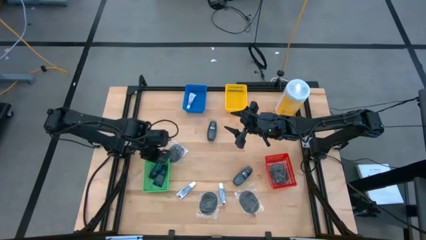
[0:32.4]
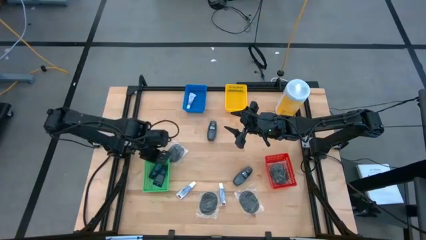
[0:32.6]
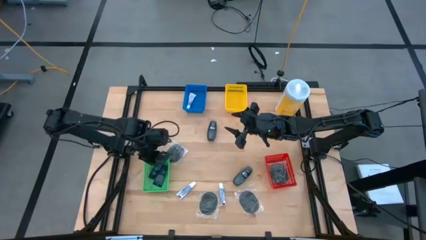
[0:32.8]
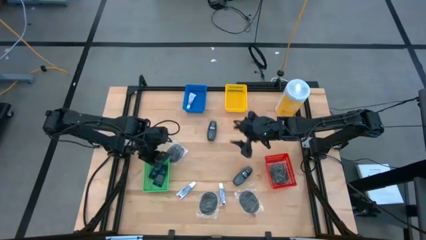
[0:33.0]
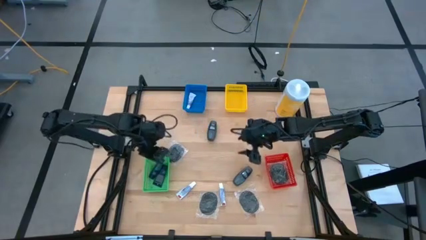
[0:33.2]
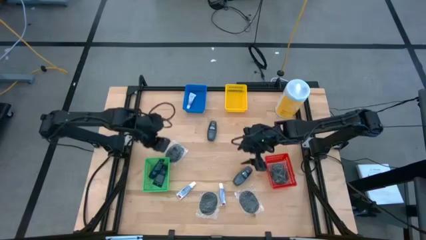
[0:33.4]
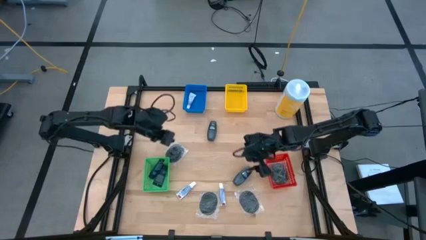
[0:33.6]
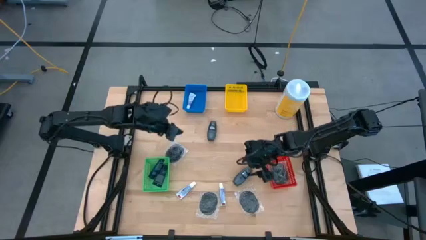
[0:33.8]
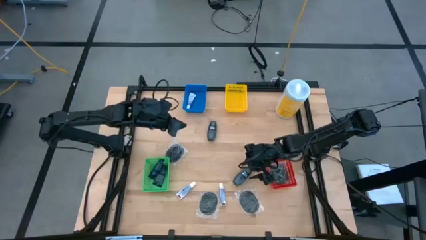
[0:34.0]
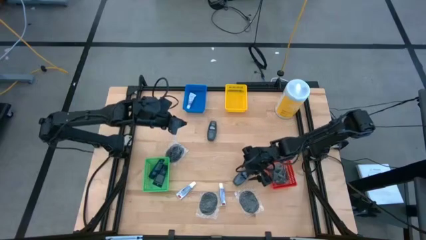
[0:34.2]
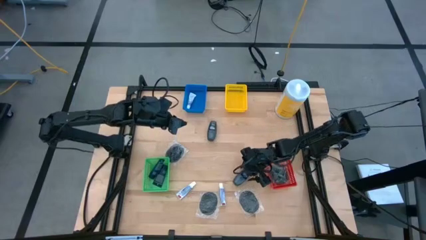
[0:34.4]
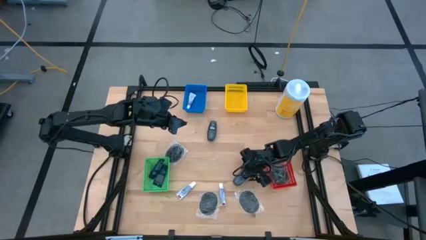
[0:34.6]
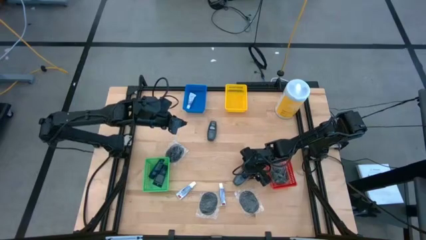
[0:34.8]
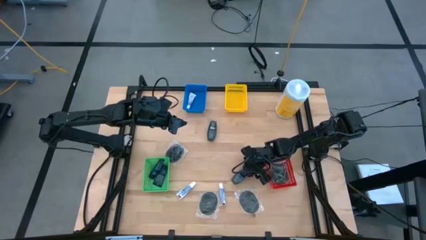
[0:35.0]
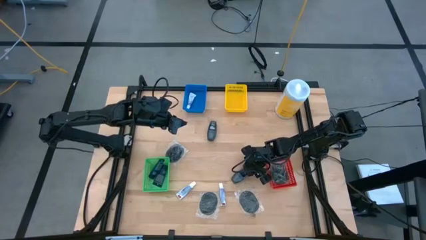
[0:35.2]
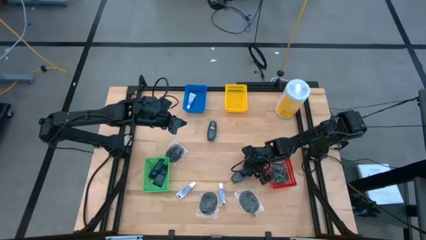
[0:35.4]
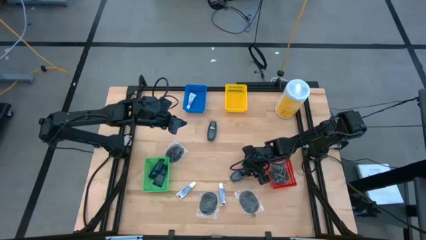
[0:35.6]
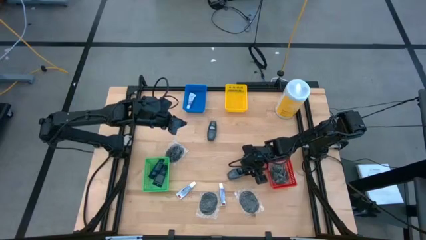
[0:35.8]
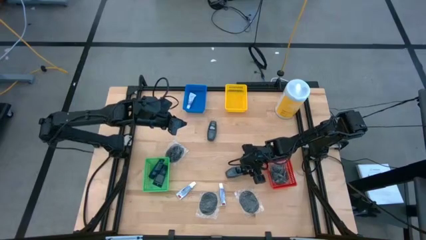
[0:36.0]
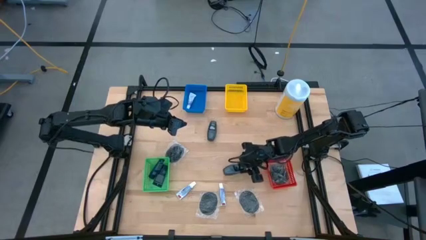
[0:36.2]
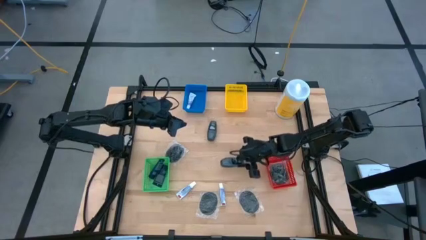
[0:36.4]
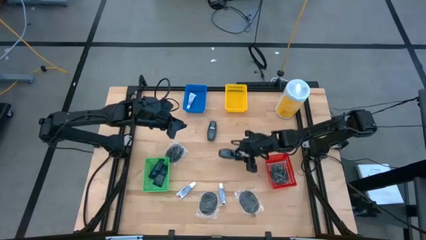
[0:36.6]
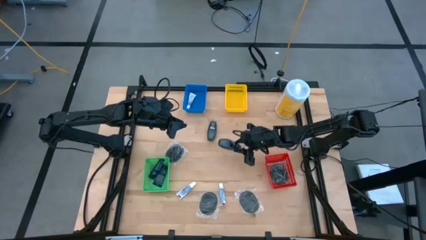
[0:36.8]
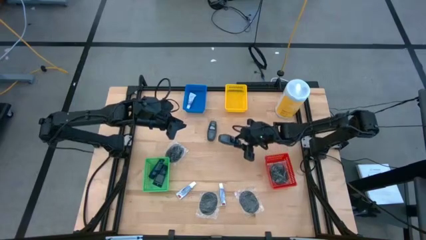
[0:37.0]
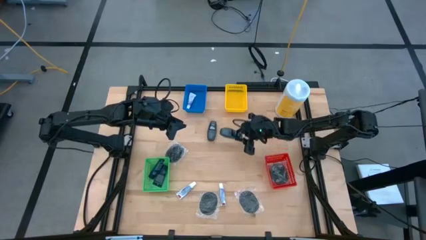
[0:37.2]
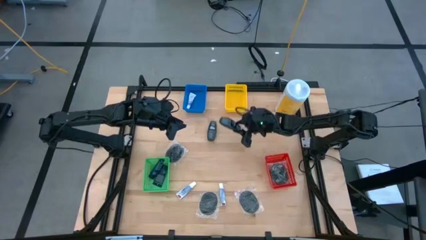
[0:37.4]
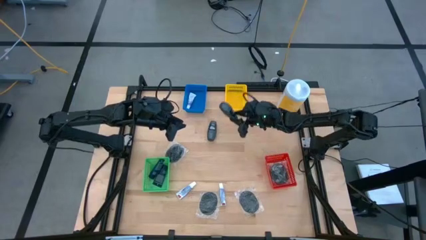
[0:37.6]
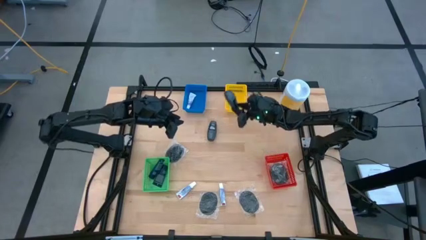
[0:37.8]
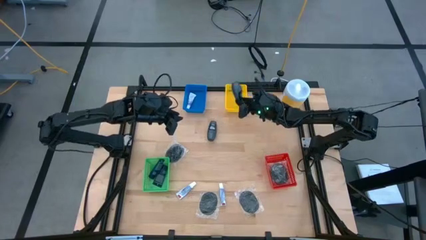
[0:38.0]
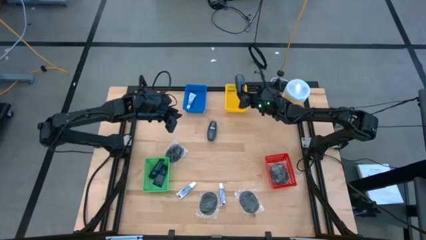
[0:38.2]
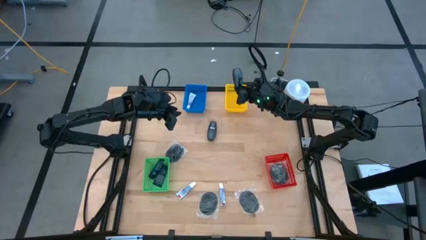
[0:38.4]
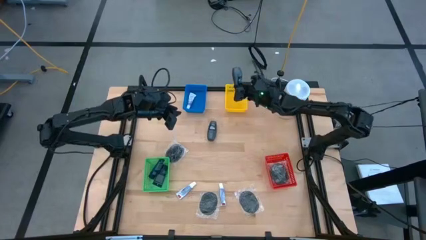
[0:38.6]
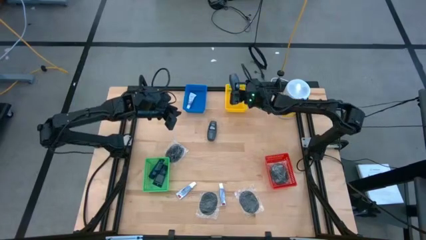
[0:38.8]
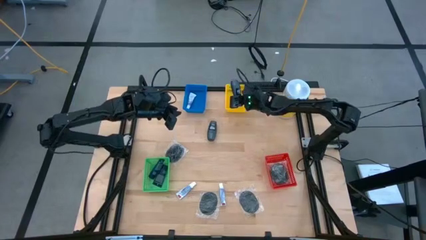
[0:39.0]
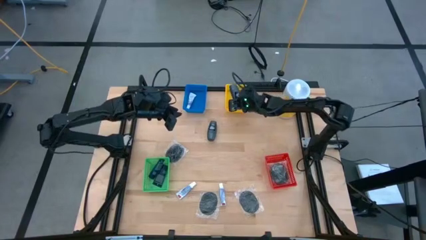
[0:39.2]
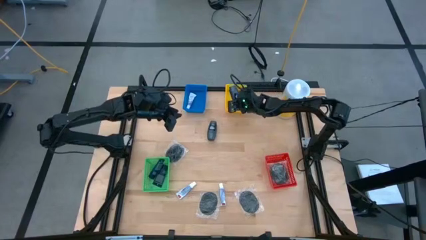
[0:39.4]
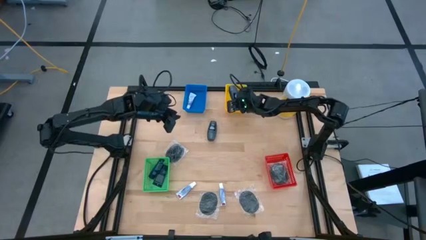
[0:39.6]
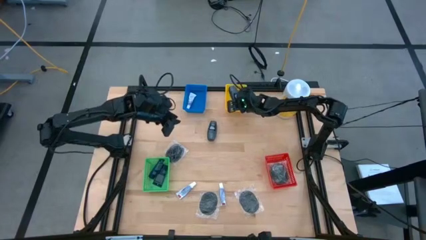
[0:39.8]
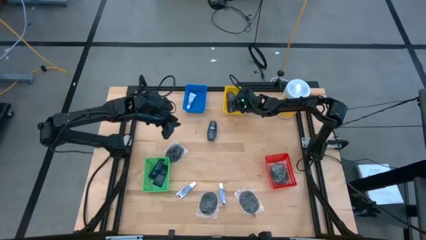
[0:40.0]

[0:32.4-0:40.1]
Task: Pick & Place Travel size toiletries
Put the gray deodorant into the yellow basket

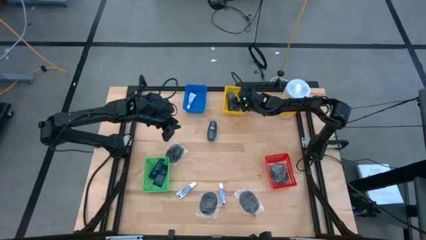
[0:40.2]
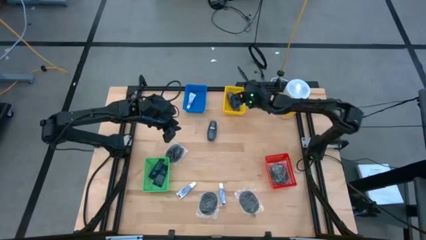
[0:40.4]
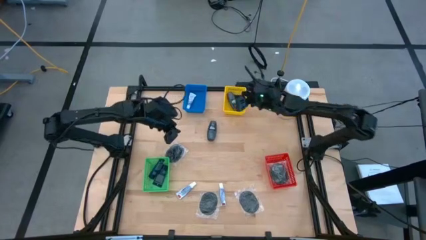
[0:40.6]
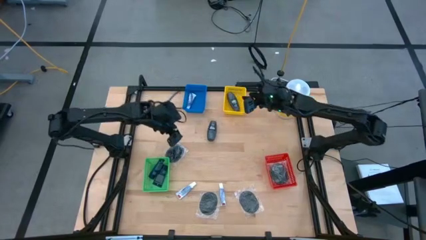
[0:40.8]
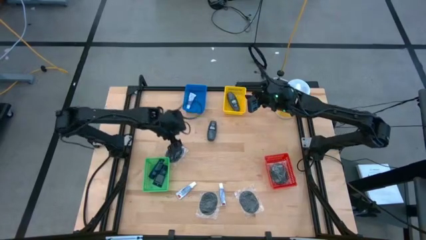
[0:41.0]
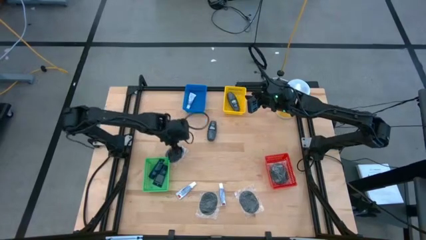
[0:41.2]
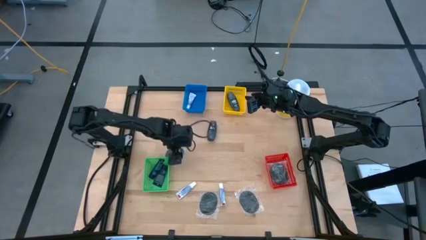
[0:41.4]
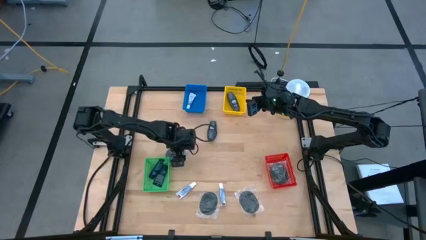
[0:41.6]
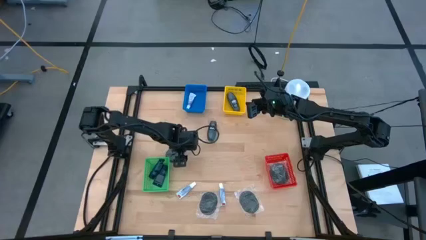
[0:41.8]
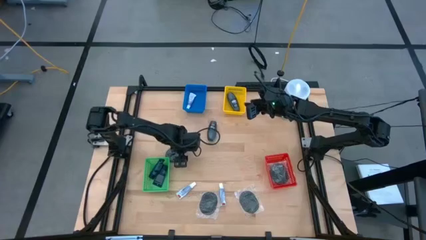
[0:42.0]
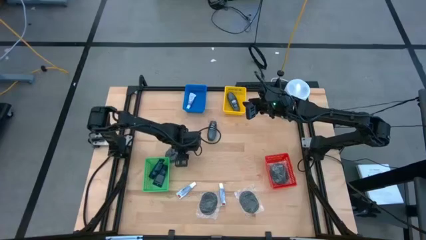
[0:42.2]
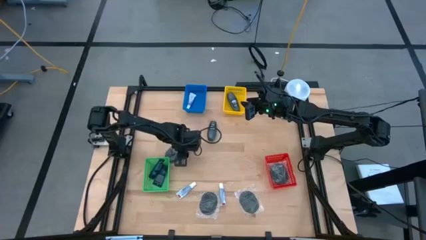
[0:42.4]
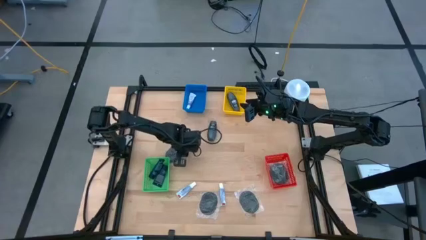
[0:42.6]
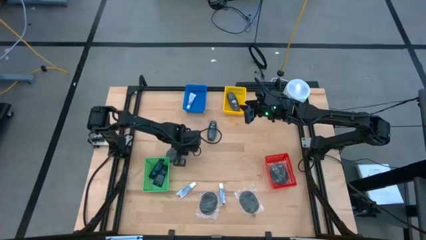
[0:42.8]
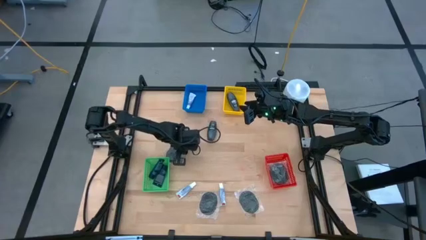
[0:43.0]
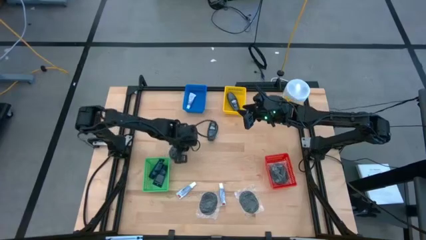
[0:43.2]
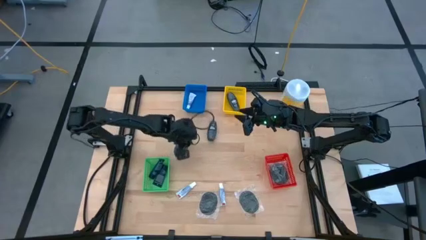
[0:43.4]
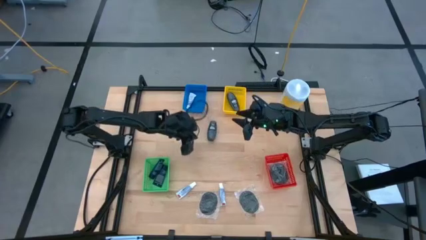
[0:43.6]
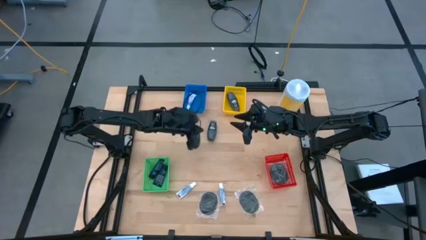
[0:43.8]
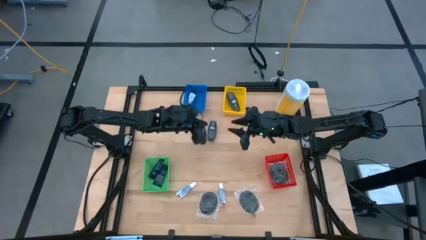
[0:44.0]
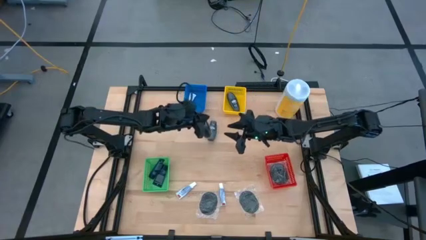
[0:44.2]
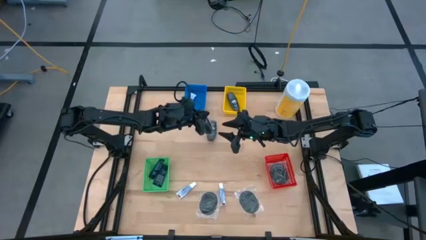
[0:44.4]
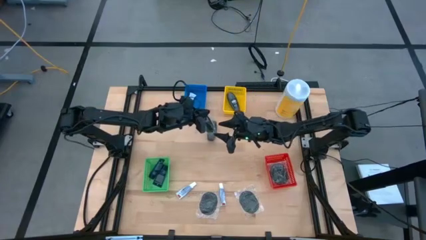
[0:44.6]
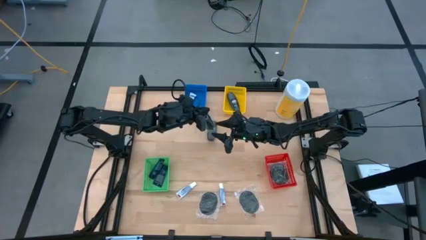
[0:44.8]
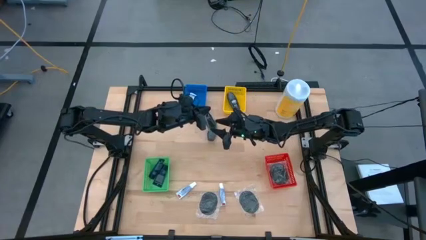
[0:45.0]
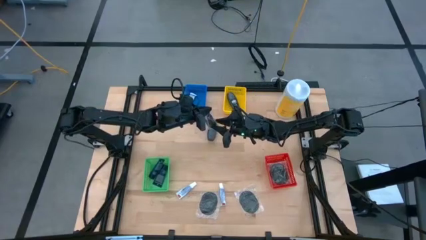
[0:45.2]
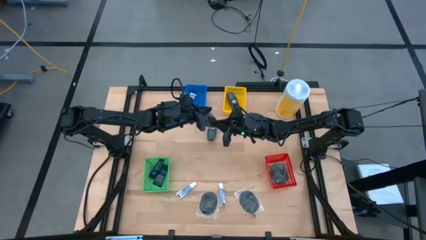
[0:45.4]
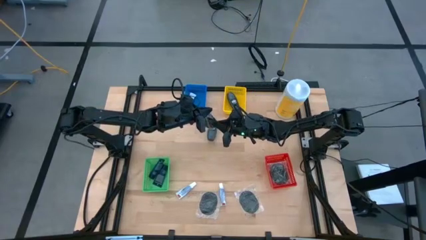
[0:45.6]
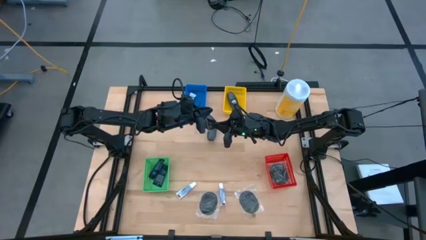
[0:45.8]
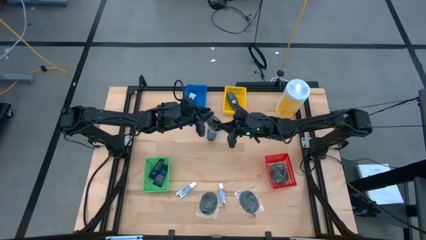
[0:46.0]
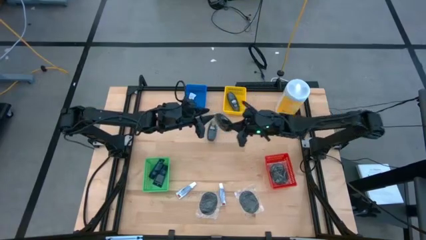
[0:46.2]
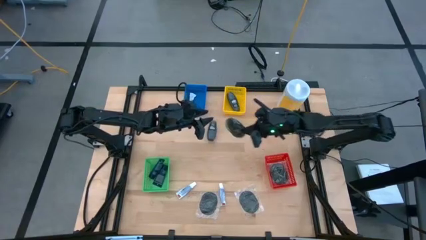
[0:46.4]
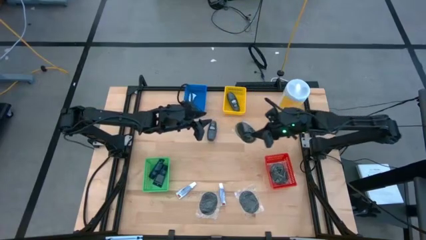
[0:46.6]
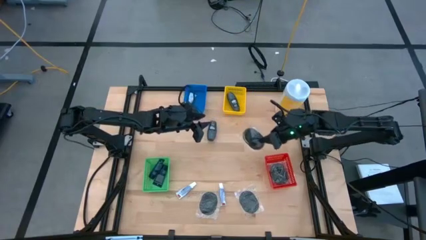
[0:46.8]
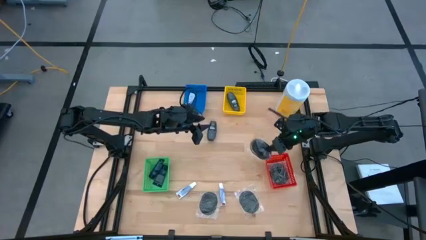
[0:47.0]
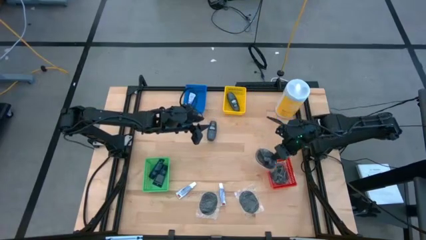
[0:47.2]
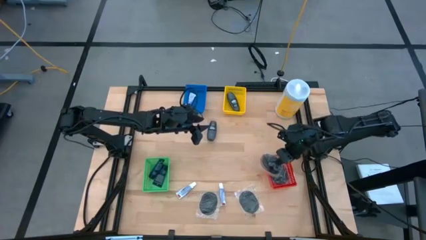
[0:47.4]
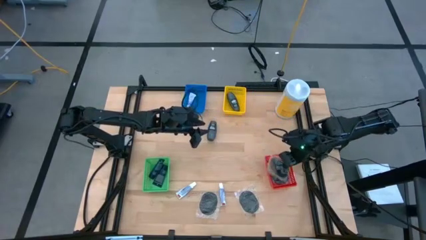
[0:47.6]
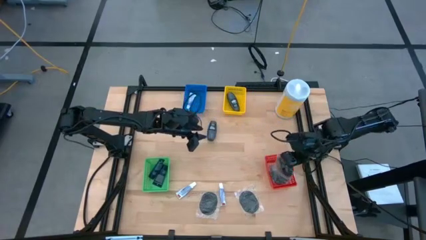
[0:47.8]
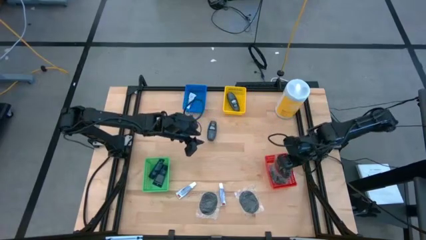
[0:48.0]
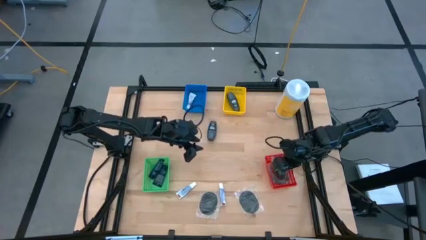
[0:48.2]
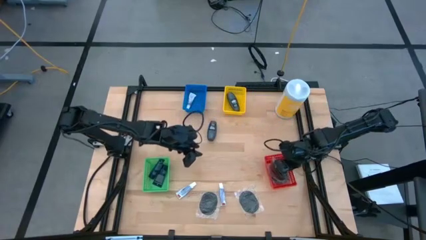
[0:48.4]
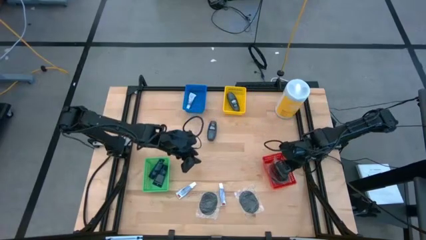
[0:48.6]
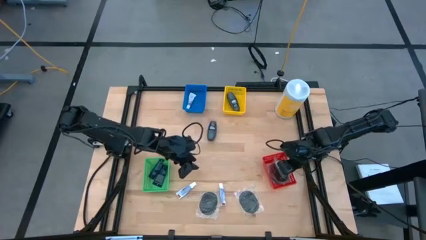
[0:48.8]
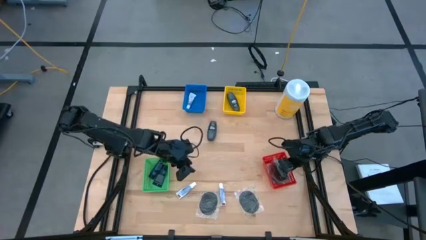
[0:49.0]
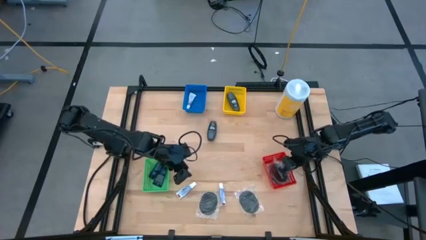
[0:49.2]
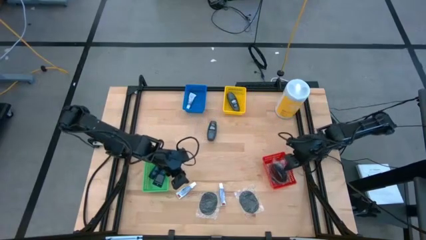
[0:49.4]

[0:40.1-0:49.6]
Put the black hairbrush into the red basket

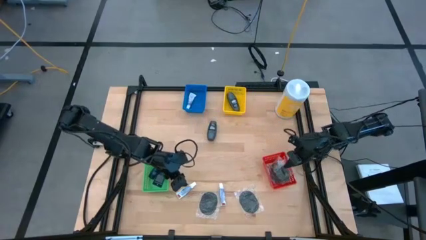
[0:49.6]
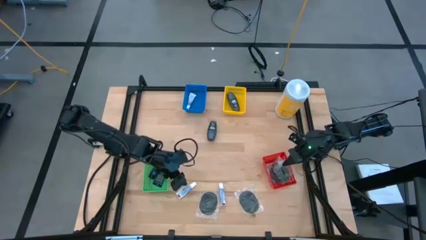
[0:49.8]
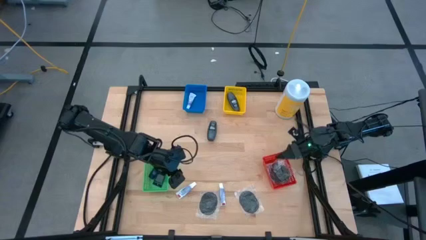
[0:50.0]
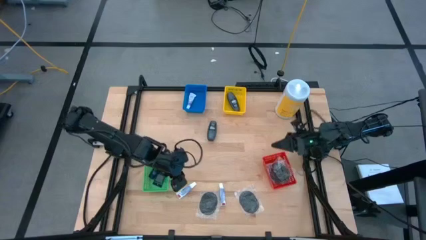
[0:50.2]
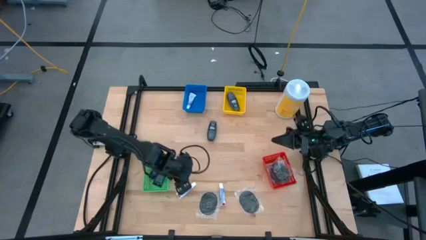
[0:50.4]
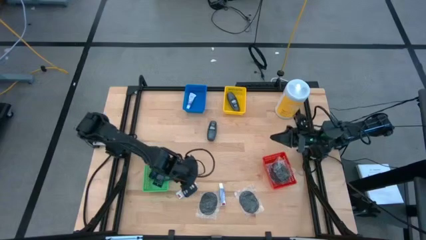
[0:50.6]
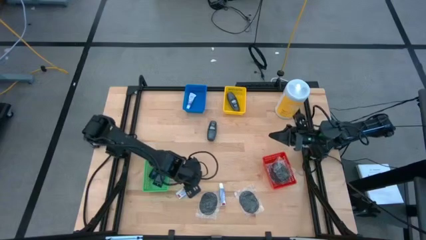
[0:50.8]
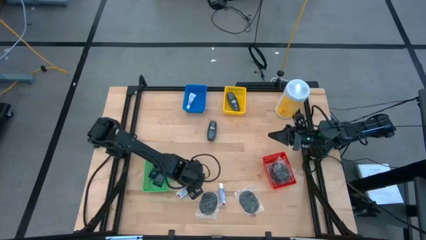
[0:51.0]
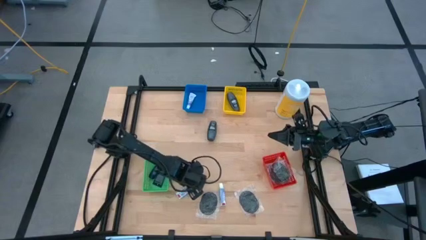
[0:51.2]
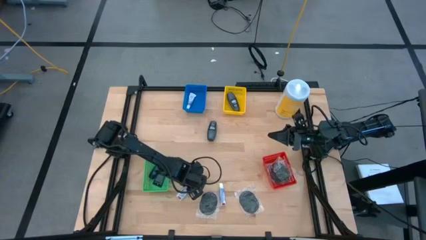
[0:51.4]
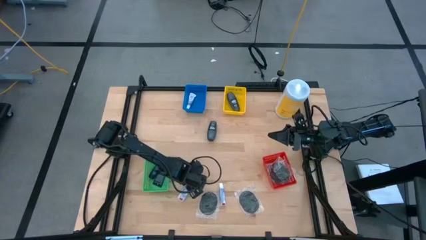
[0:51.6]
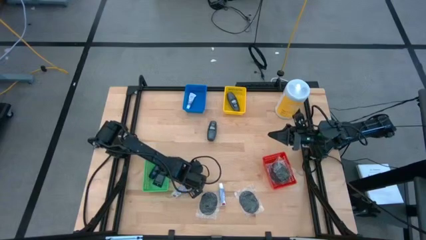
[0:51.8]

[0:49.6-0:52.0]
Put the white toothpaste into the blue basket
